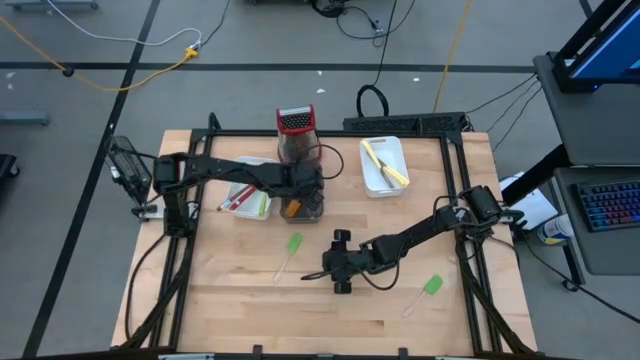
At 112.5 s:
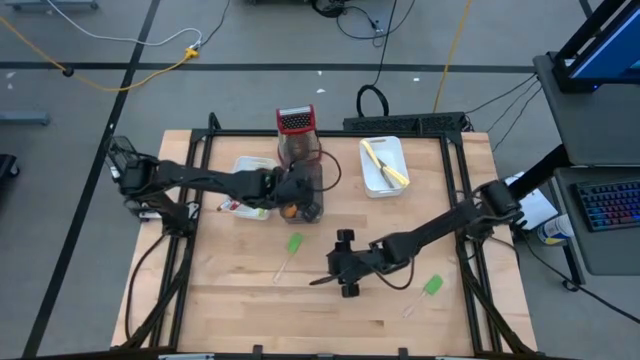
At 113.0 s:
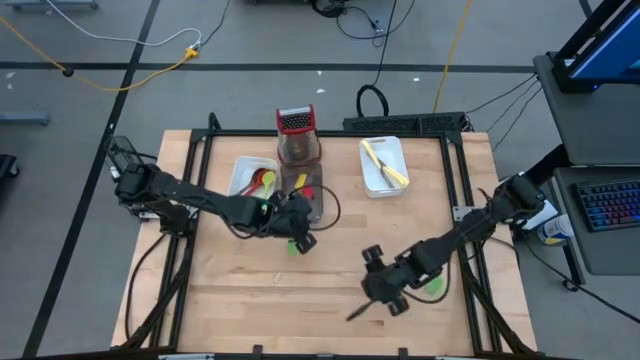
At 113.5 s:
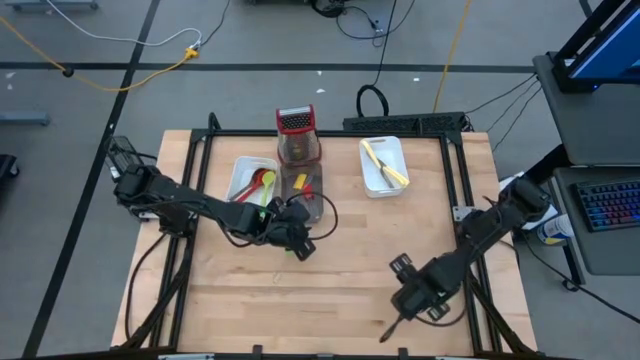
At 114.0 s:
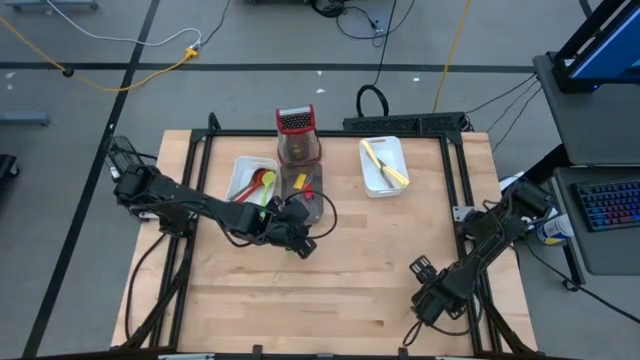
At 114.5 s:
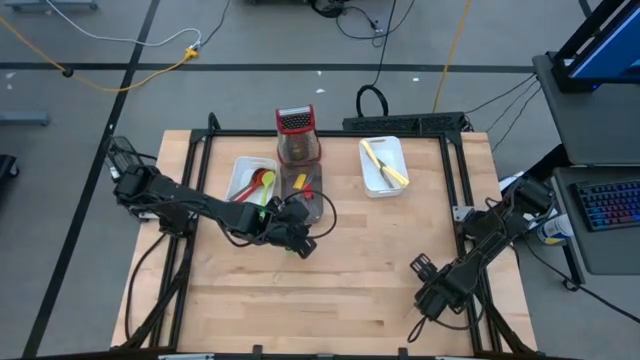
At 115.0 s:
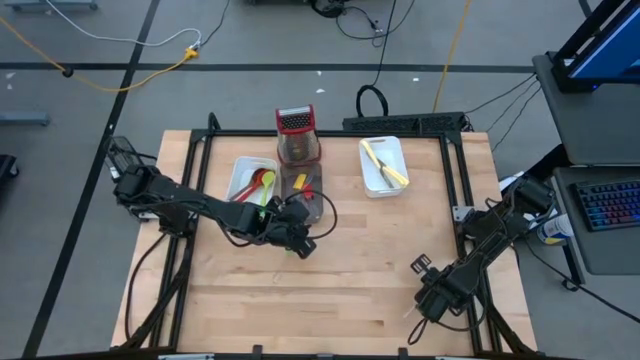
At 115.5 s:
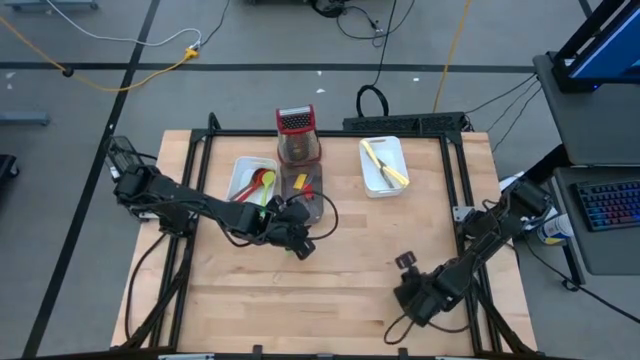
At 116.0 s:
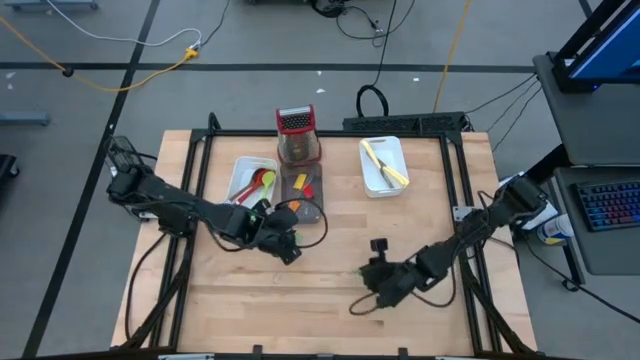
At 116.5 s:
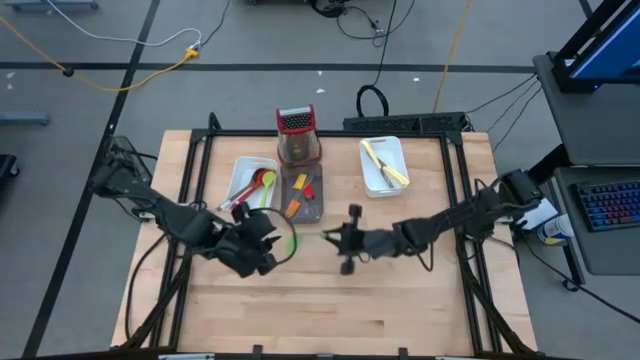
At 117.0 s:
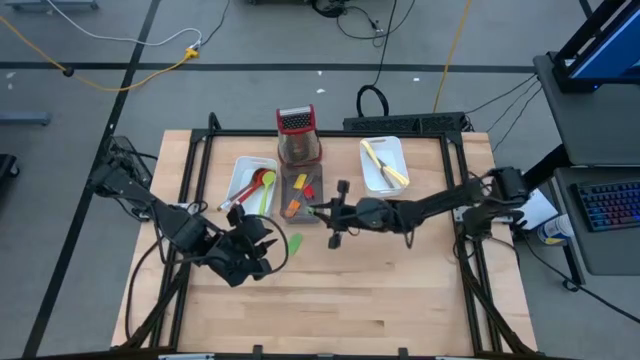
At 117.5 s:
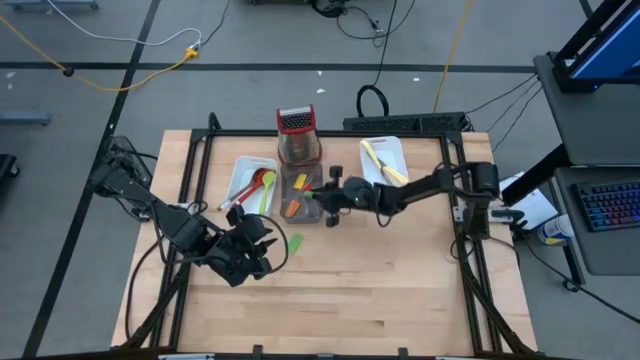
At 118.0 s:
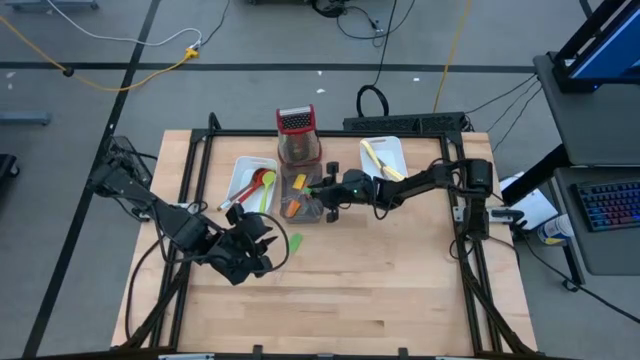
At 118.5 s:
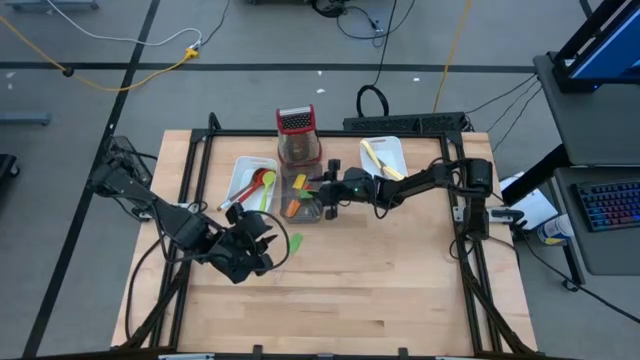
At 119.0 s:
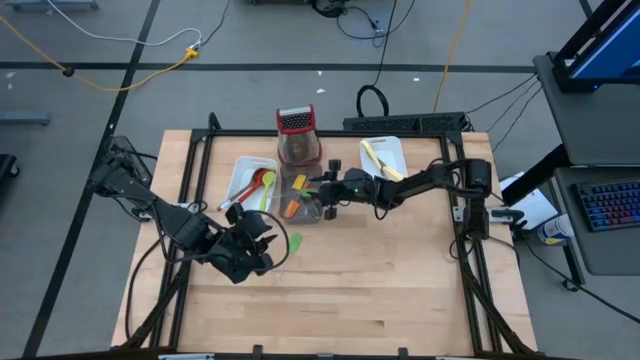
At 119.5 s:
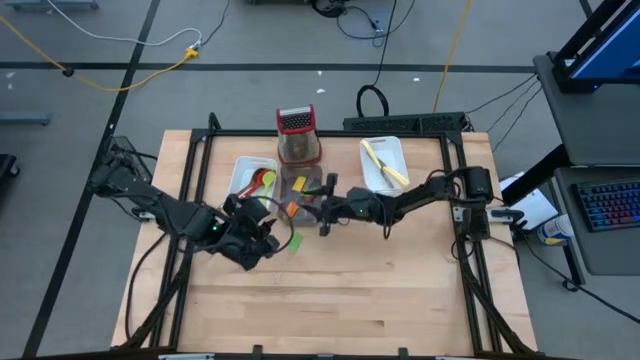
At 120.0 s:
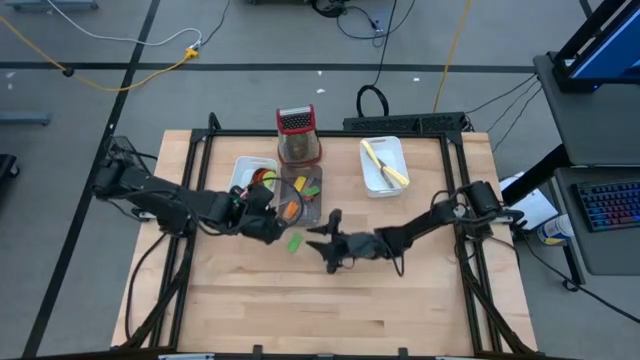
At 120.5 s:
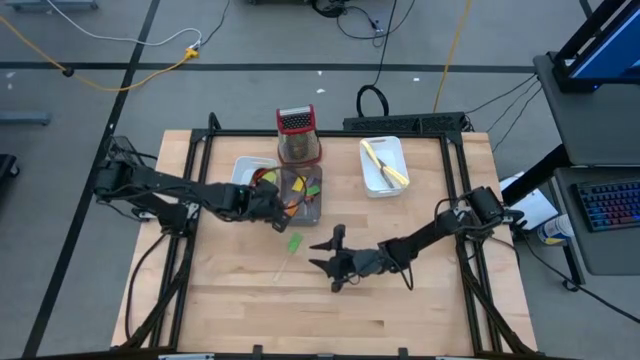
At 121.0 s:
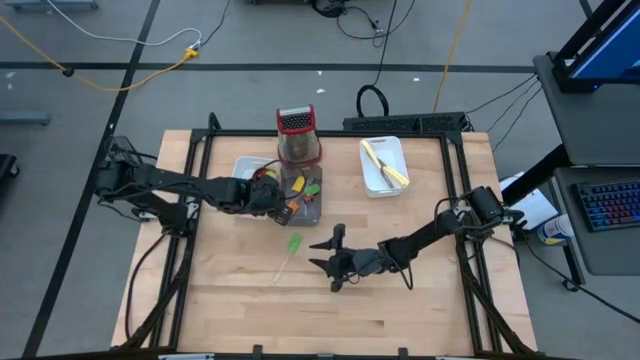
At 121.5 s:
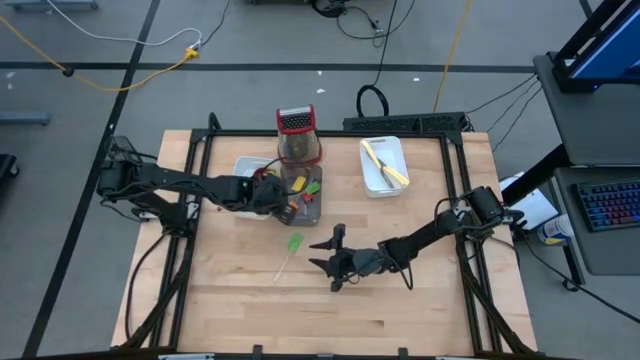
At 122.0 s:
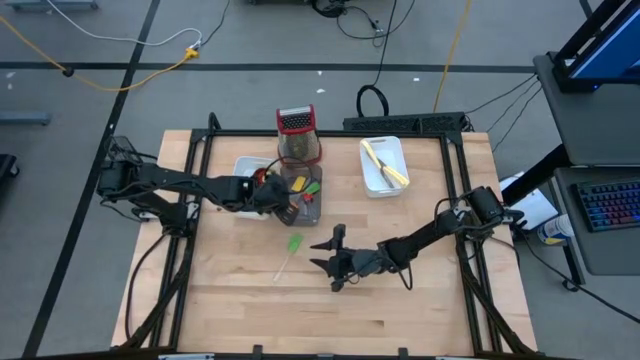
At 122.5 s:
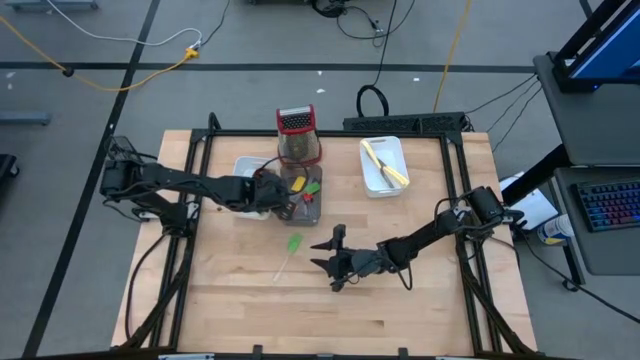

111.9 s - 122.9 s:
Task: Pick & Place Kitchen Items
Put the right green spatula into the black bin

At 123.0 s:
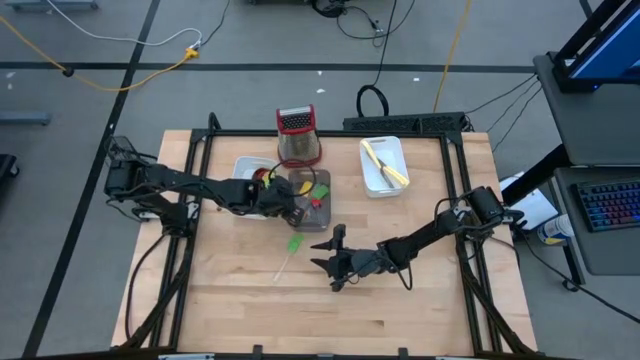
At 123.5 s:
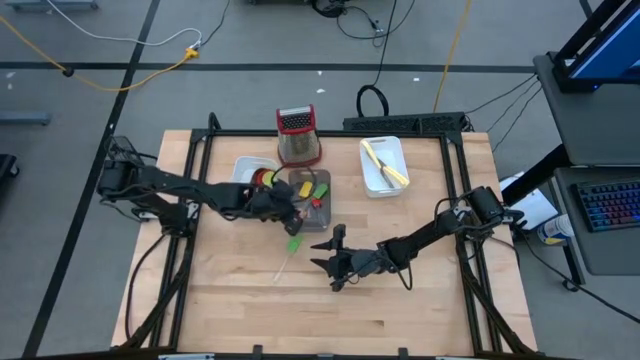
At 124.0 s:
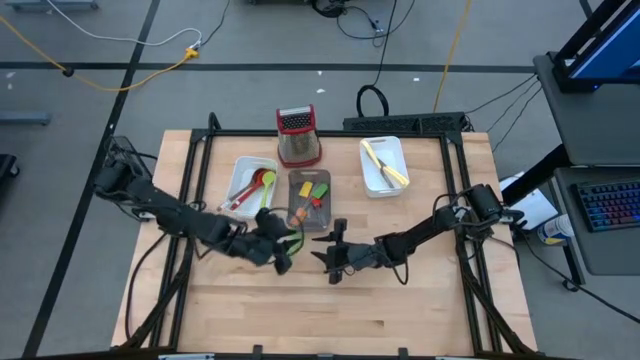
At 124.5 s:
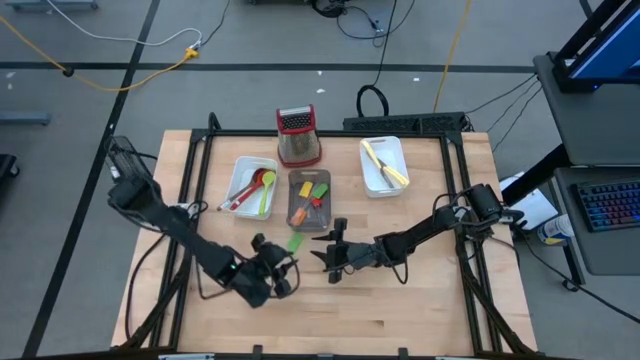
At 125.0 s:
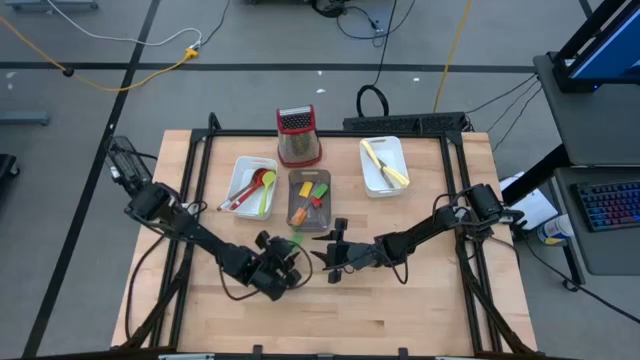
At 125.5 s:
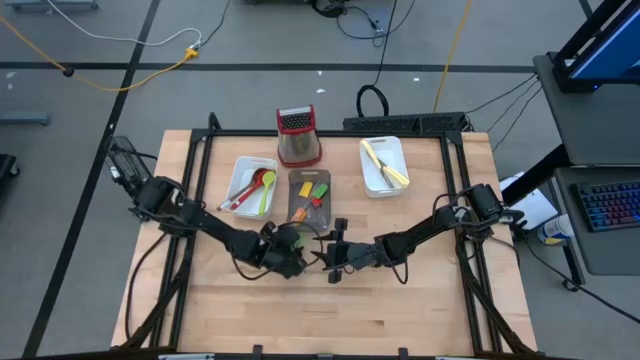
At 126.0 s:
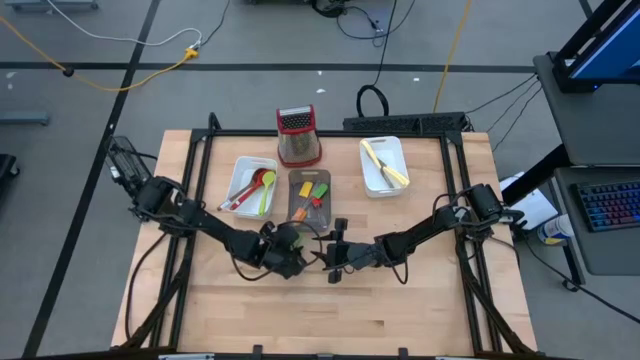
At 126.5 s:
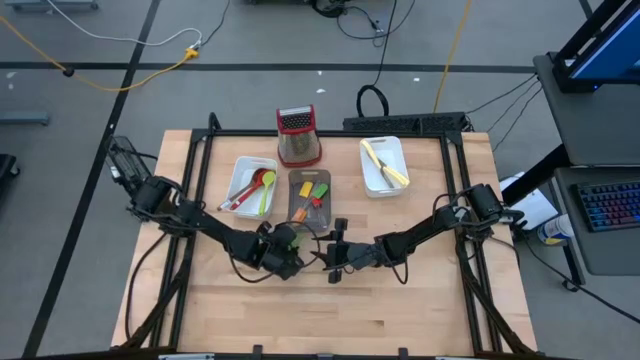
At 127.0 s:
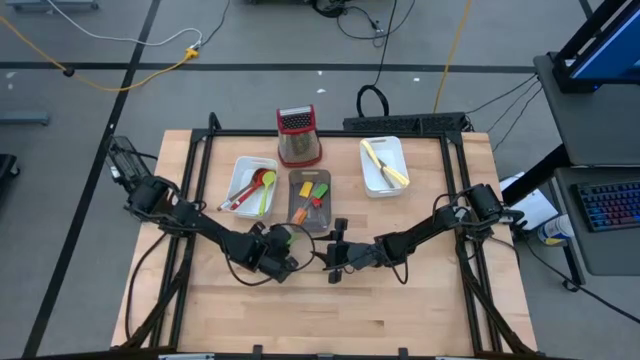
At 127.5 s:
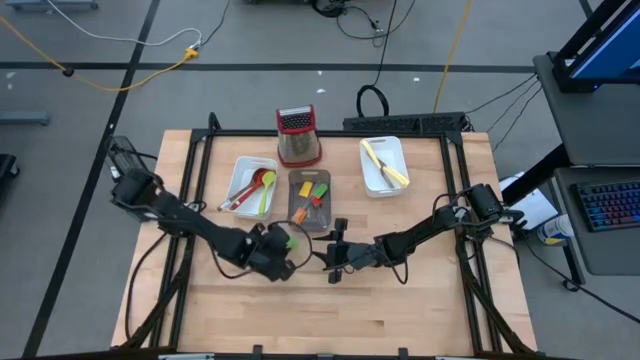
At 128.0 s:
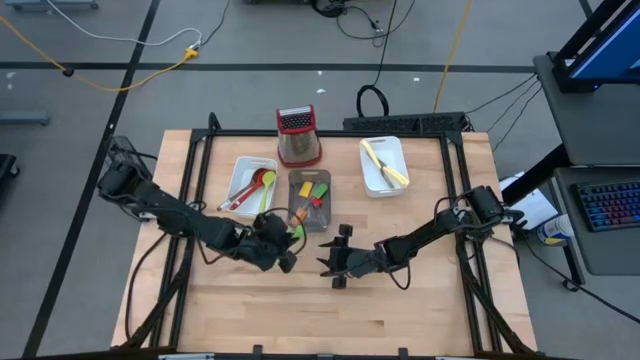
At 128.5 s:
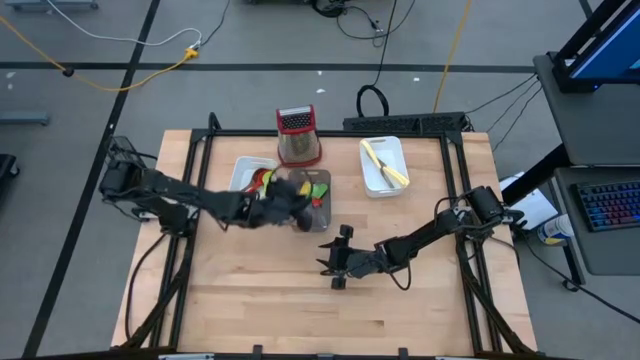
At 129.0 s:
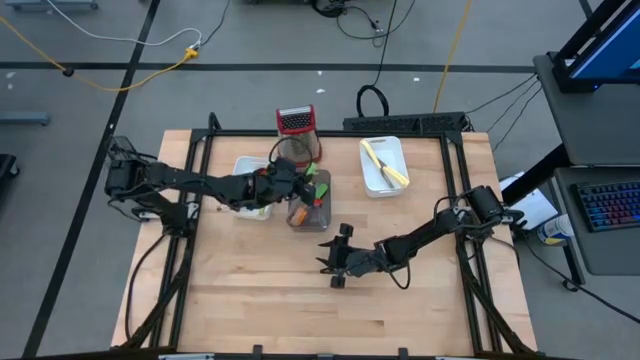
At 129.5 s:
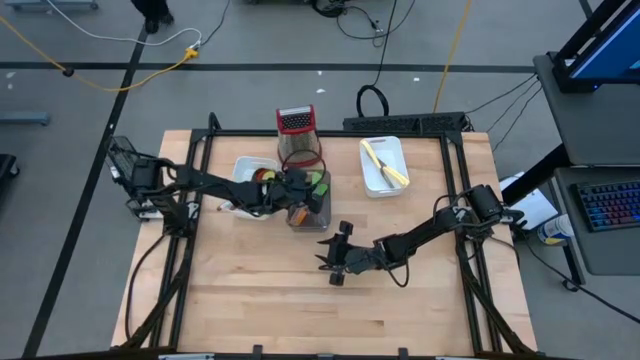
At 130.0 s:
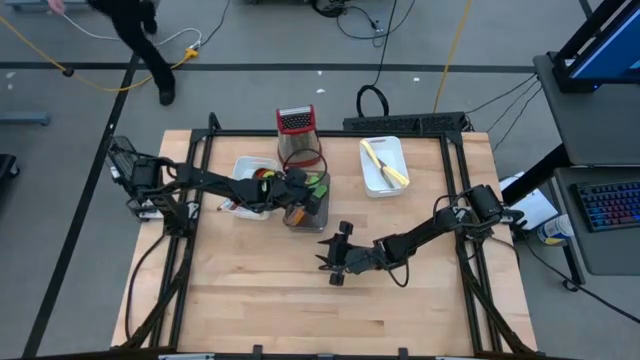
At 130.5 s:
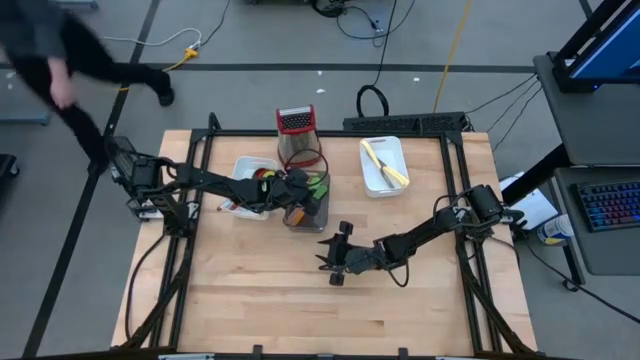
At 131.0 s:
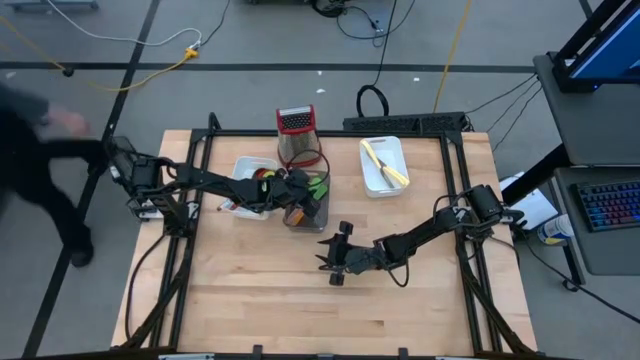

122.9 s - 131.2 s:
Put the green spatula into the black bin

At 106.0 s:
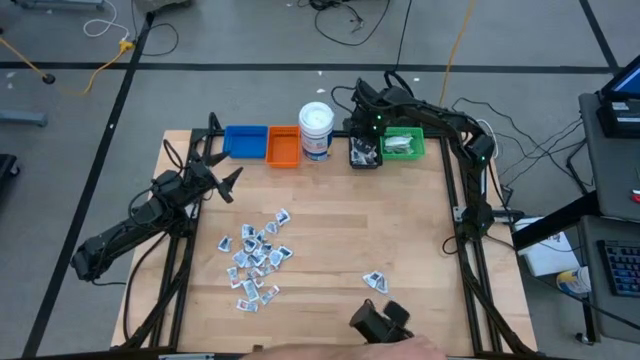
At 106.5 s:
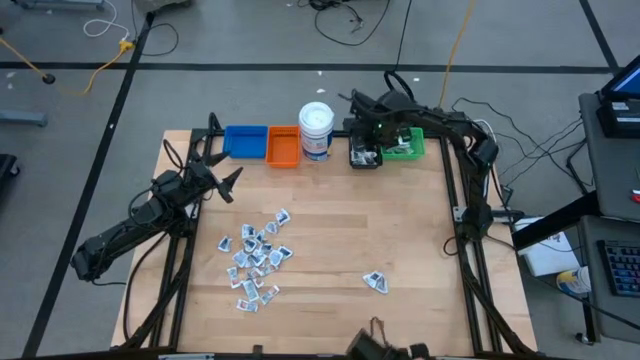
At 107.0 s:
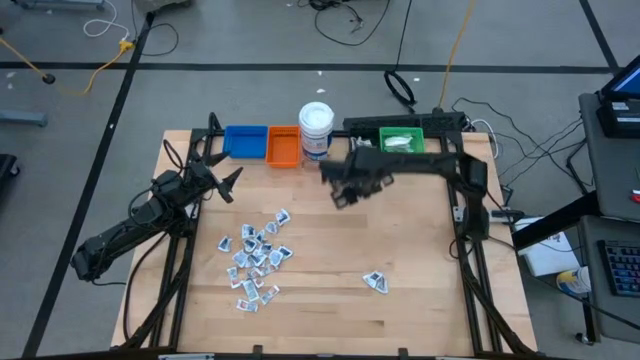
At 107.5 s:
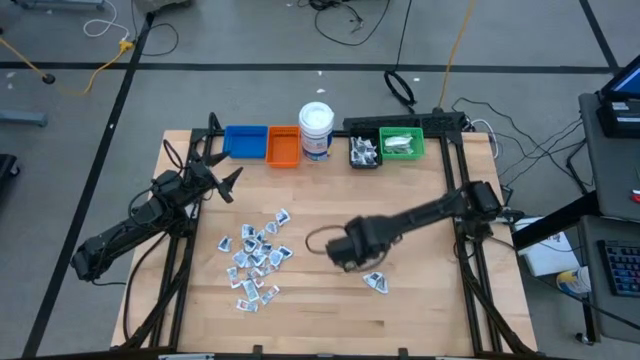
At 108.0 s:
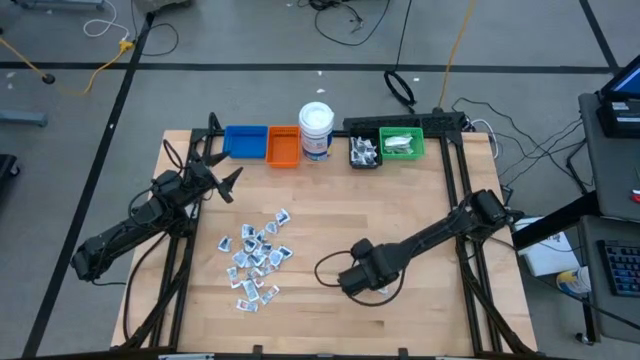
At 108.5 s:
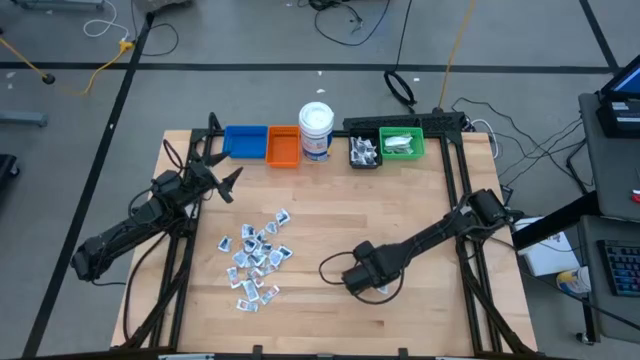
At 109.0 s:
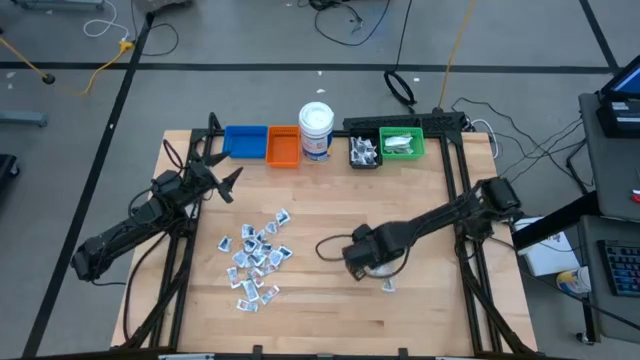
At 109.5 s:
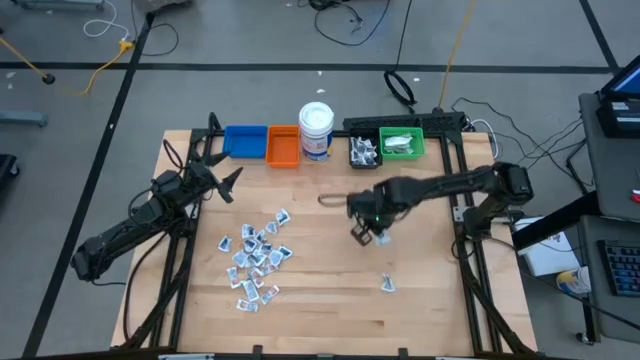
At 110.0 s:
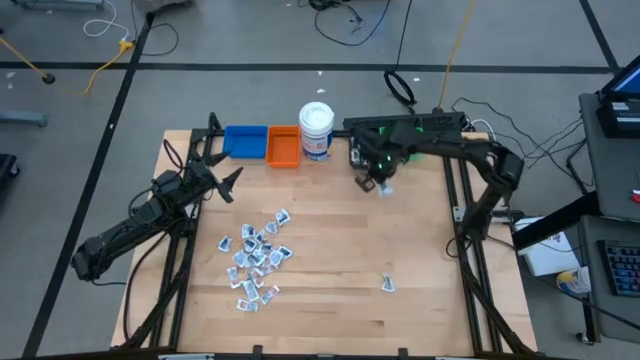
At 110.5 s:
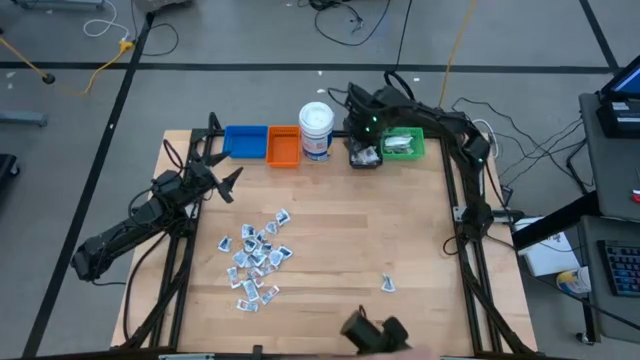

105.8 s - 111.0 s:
Task: Pick & Place First Aid Supplies
Put the towelette pack into the black bin
